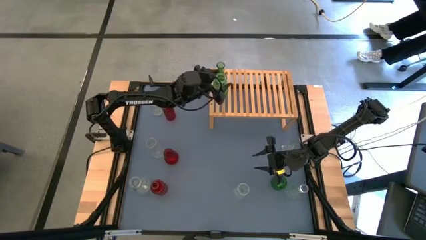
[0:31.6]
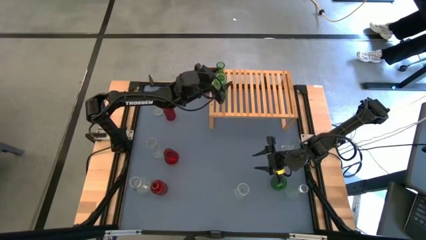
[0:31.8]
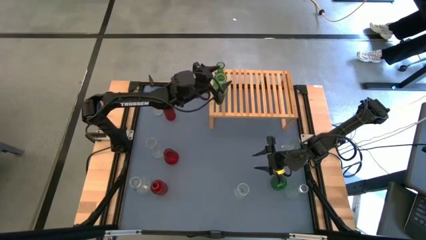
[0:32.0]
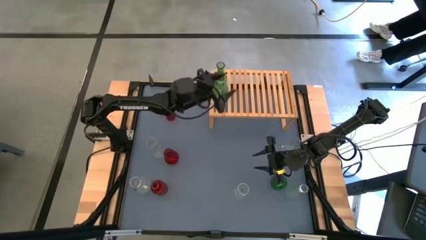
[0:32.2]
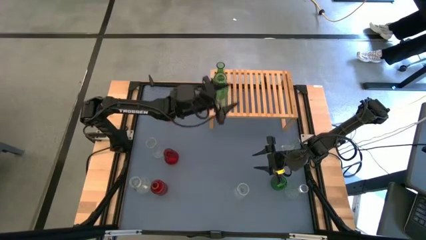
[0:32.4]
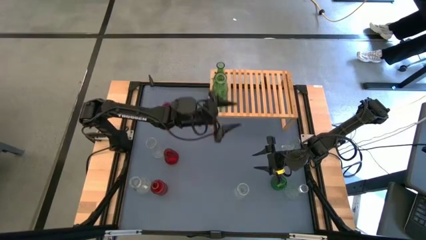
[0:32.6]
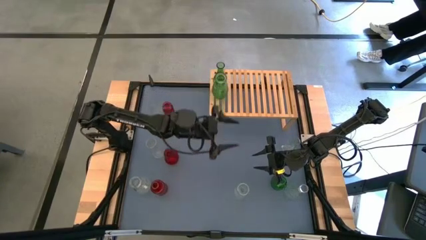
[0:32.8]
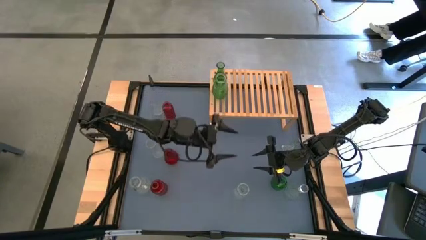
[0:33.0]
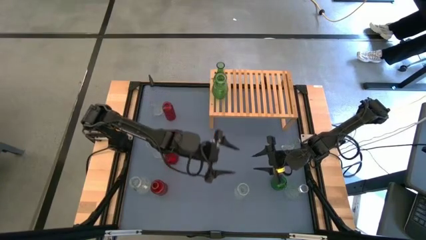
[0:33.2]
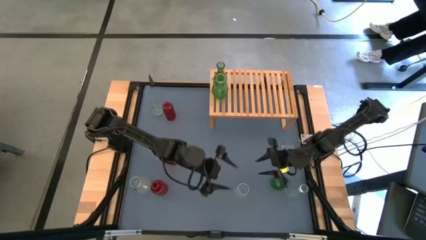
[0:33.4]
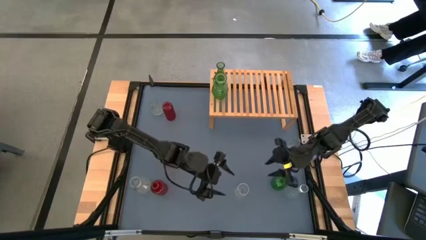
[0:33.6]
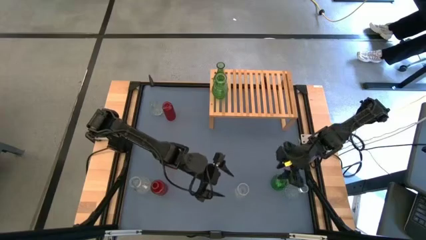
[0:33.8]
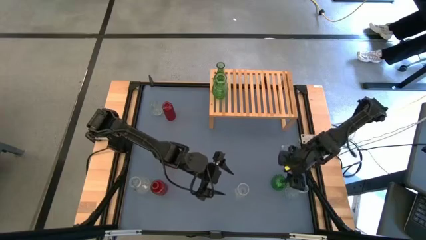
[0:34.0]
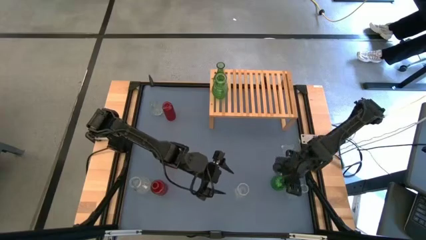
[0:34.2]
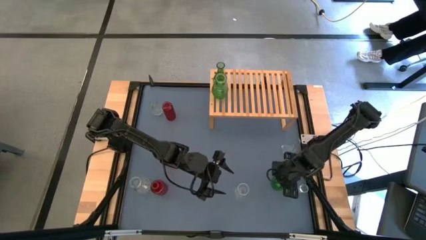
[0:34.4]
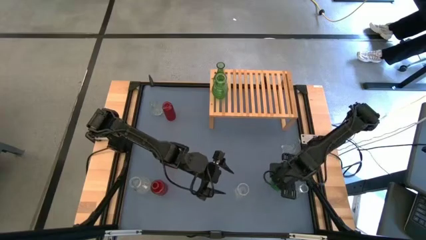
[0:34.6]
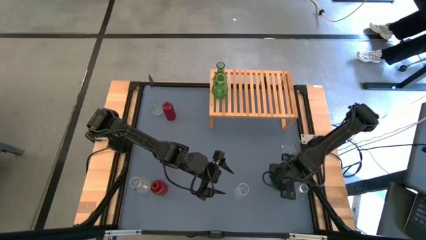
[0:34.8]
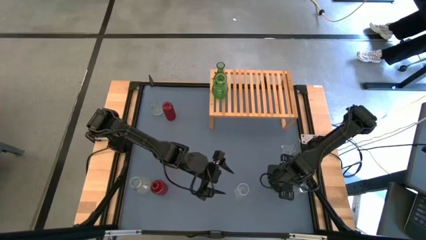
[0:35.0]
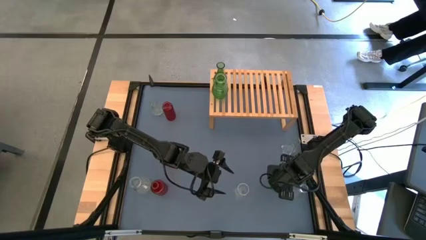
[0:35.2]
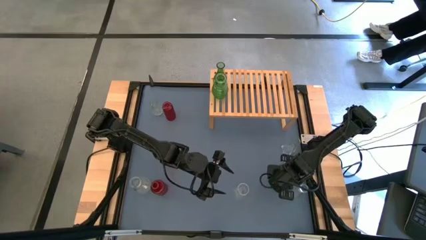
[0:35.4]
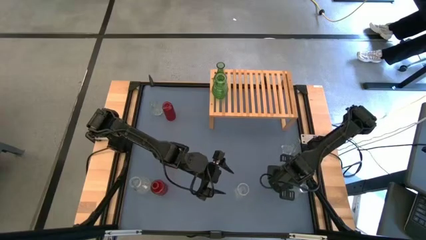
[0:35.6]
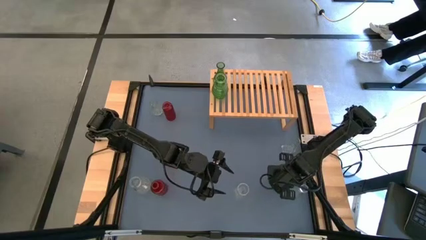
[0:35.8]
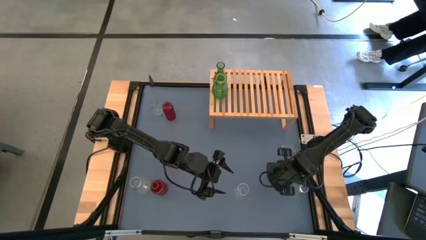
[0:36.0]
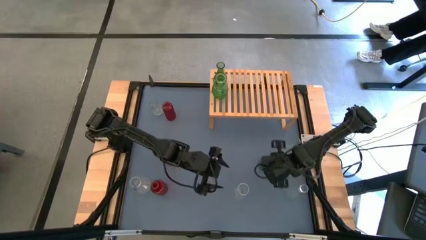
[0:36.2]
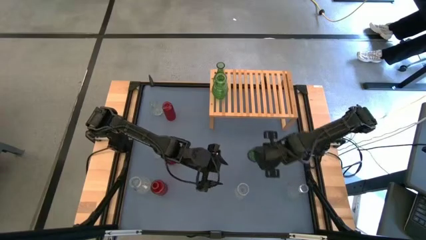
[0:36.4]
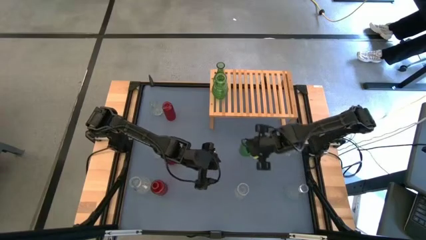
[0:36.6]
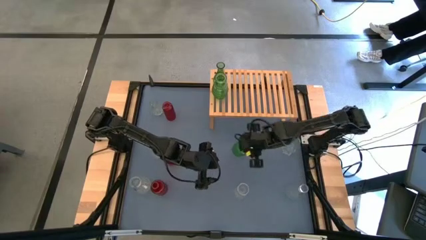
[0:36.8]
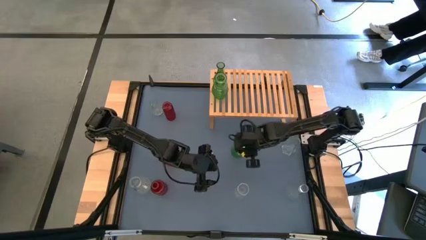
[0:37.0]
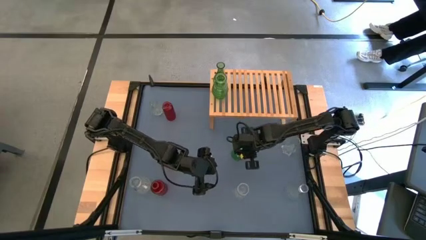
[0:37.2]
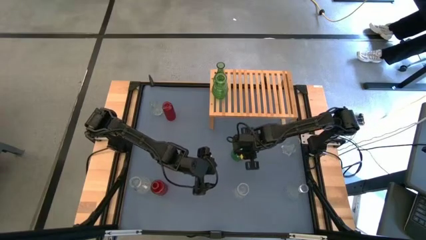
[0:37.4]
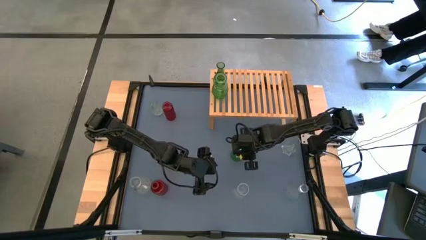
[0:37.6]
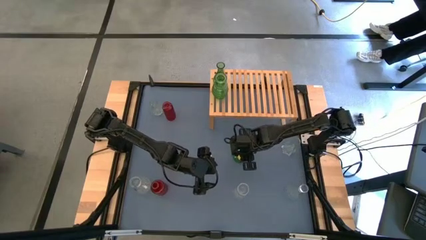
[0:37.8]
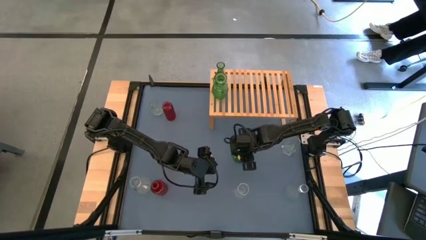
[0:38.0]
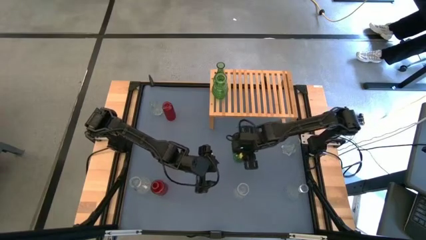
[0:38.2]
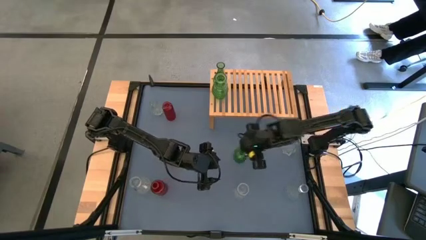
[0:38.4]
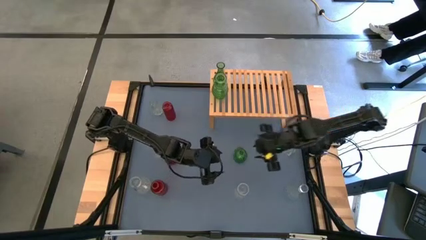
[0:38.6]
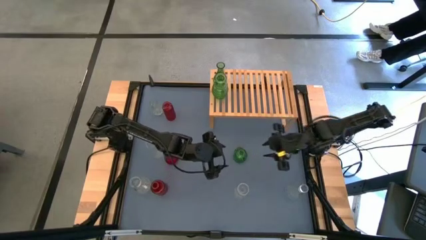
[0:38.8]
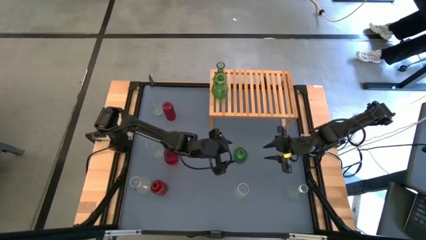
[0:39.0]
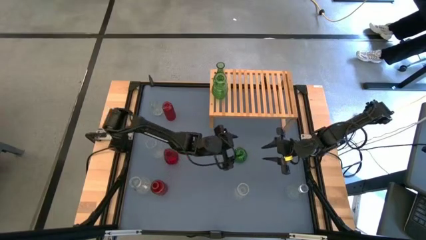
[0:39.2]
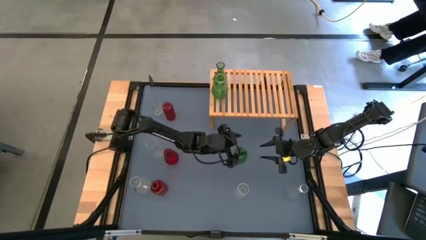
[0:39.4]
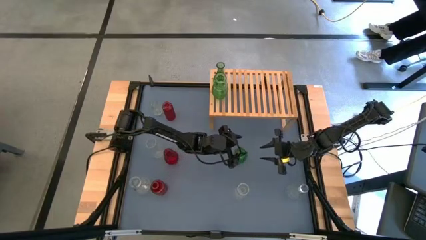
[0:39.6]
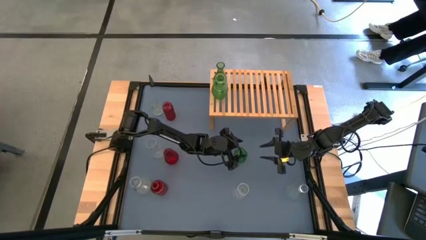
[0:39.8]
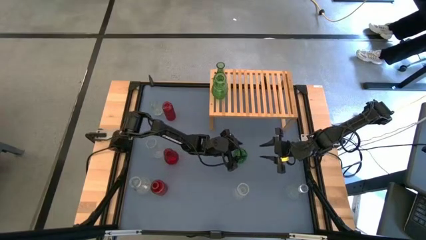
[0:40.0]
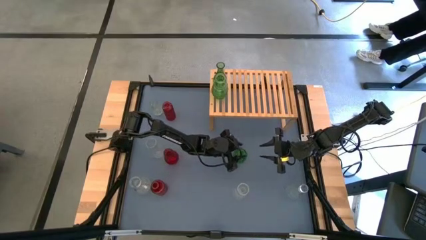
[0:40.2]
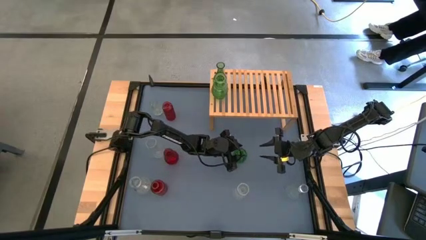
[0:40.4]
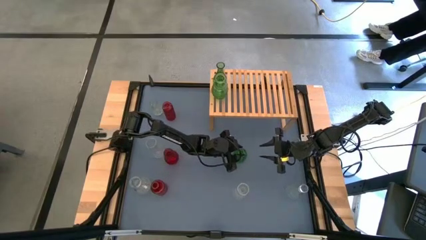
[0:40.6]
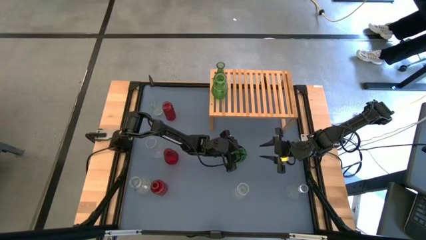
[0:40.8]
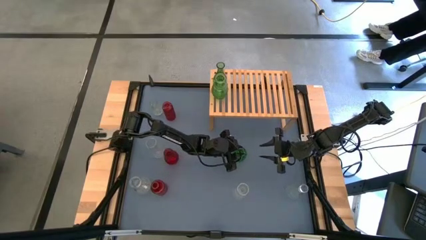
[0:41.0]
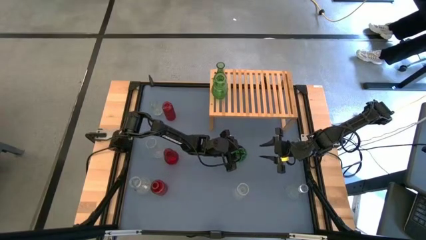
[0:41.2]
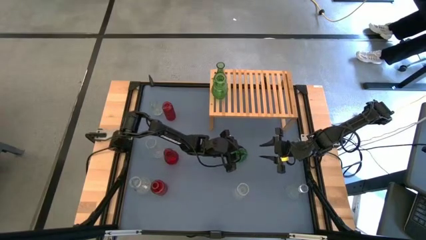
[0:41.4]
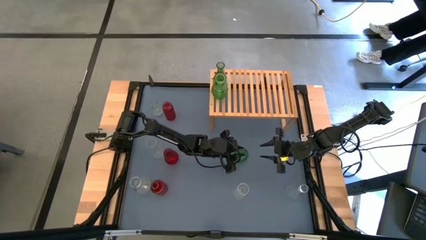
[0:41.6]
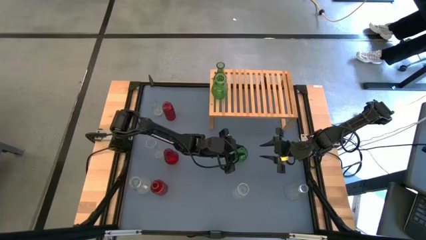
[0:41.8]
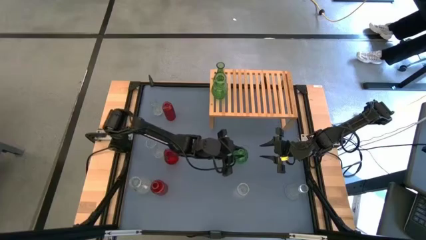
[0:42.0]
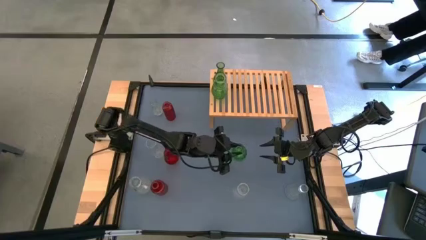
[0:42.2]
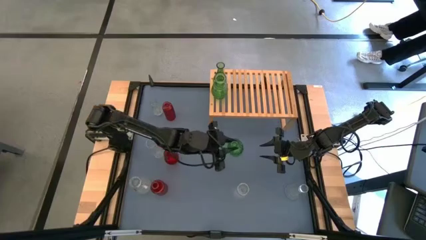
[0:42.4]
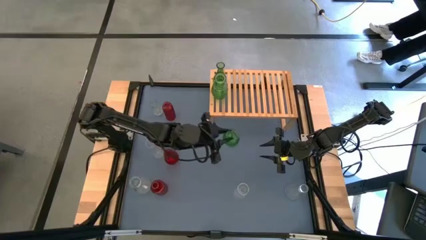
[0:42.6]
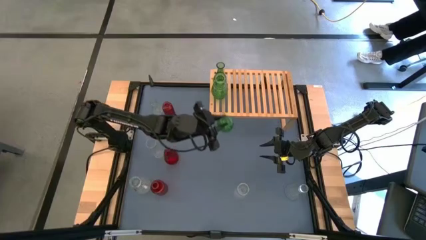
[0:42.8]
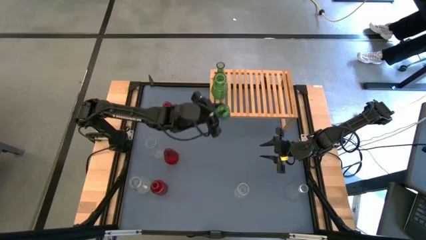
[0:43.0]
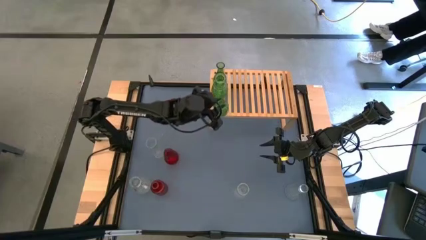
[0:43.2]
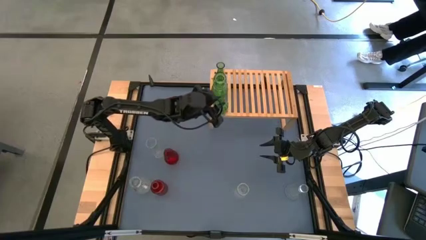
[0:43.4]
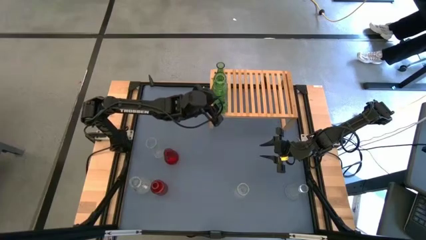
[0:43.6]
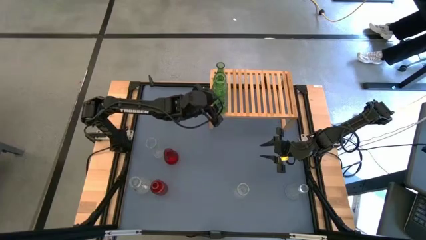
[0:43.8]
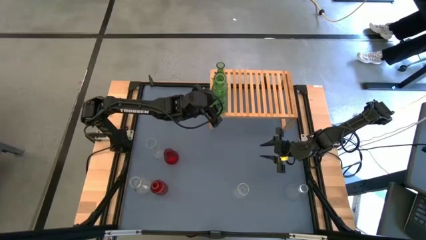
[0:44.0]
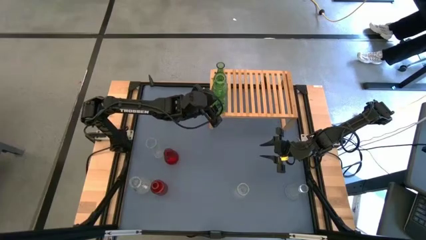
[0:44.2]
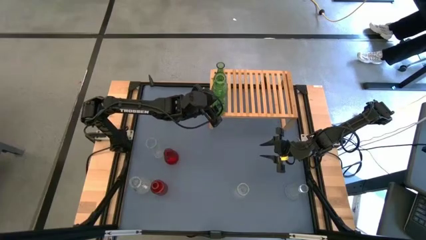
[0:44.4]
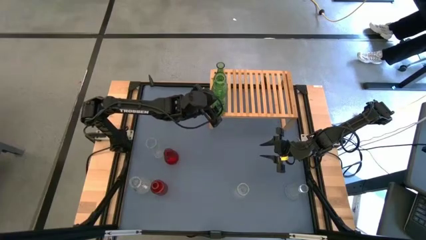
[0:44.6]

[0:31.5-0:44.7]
Task: sort vases onto shelf
Put the green vase on the shelf, aligned with the other green vases
